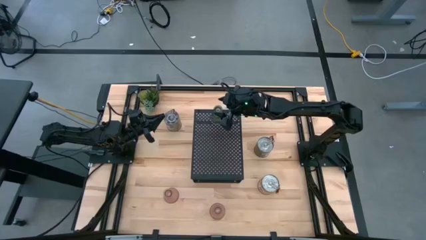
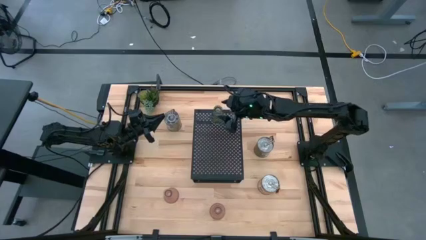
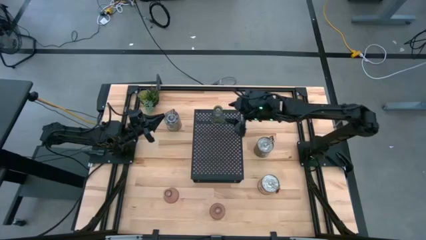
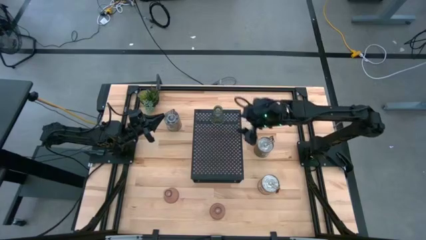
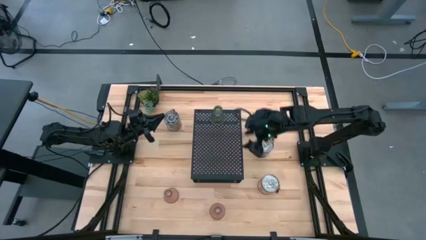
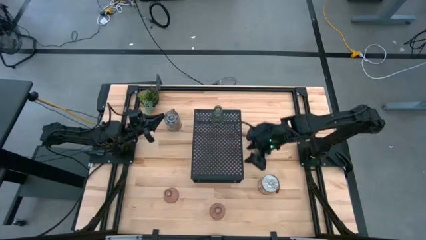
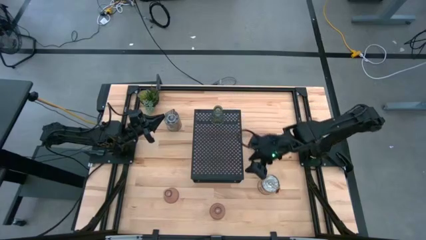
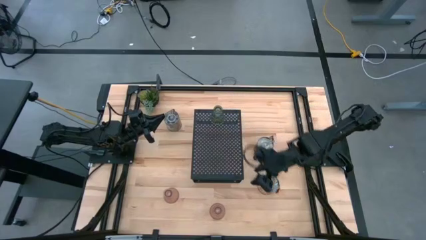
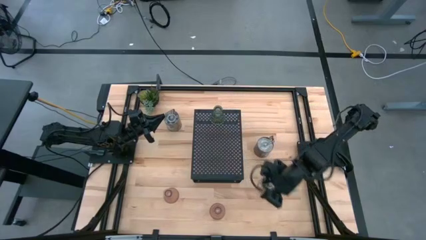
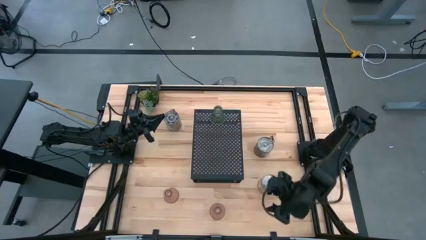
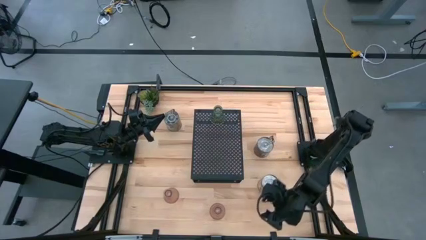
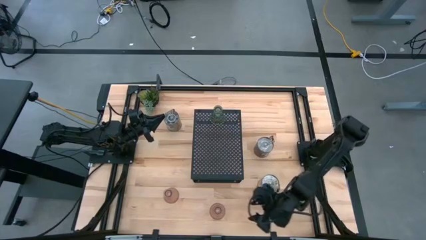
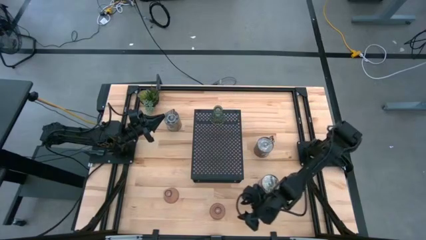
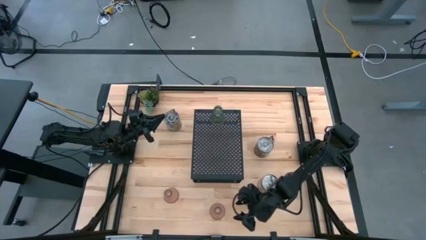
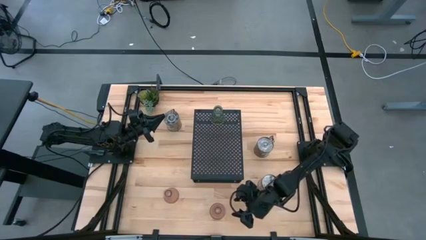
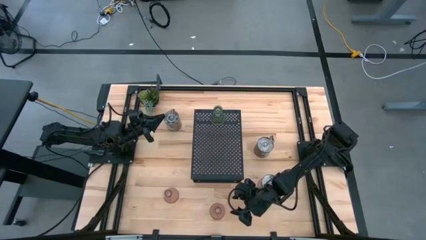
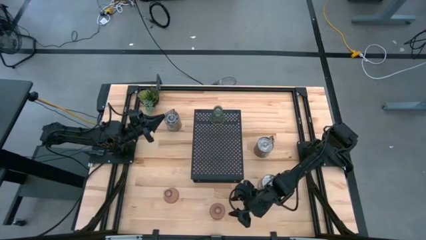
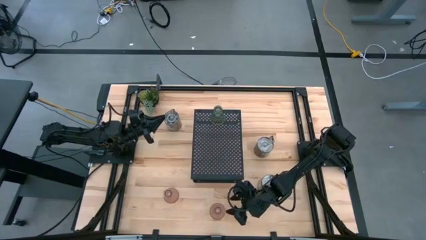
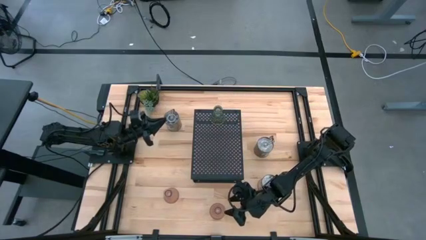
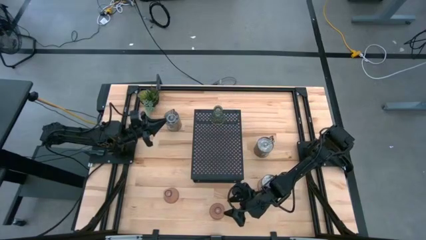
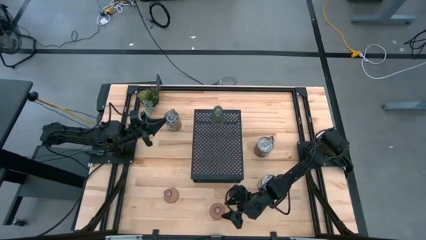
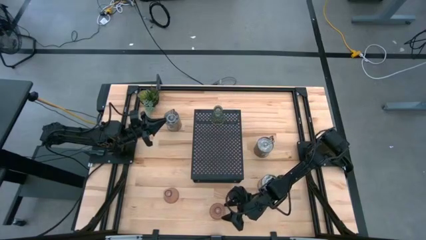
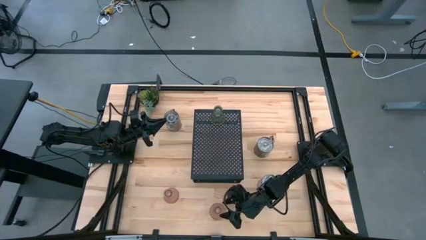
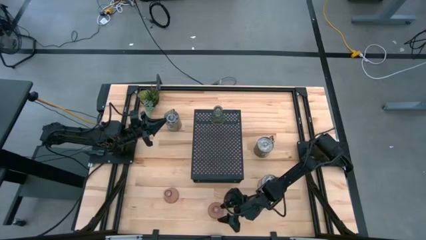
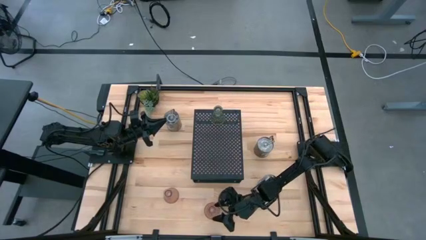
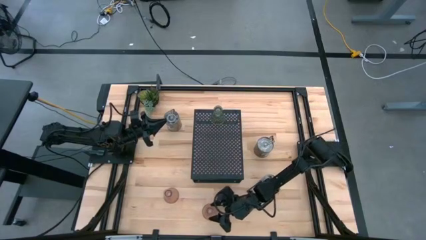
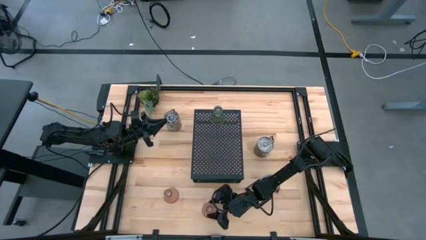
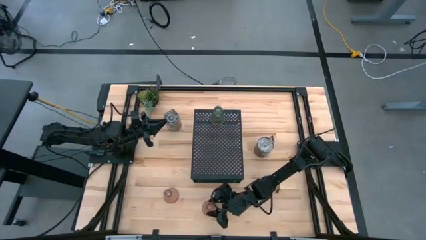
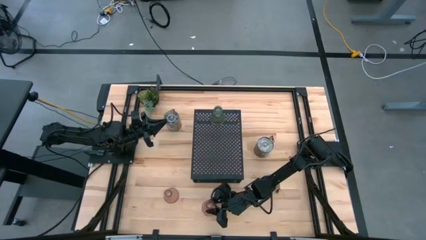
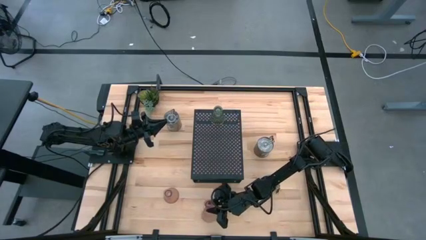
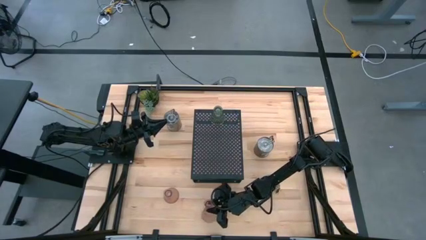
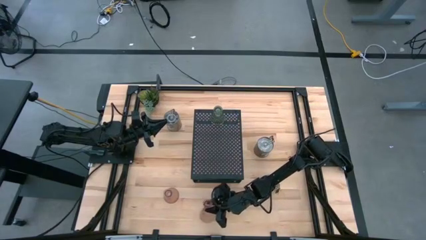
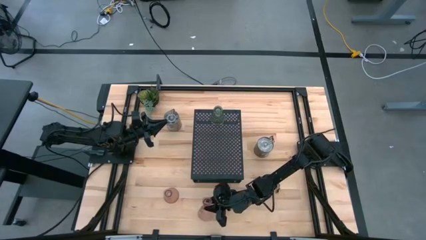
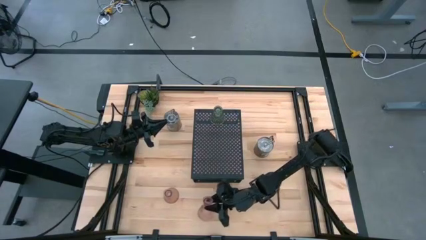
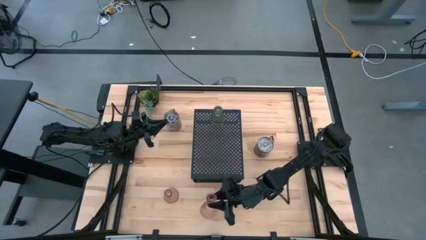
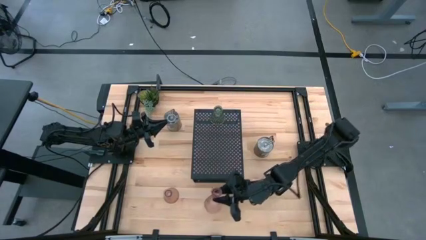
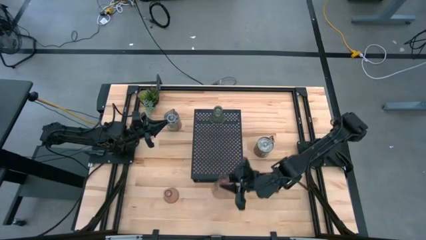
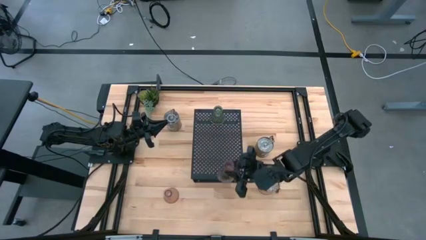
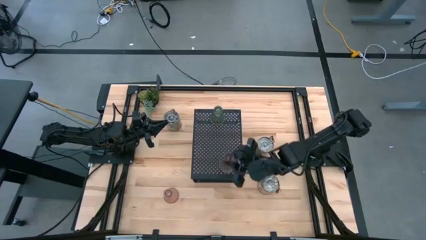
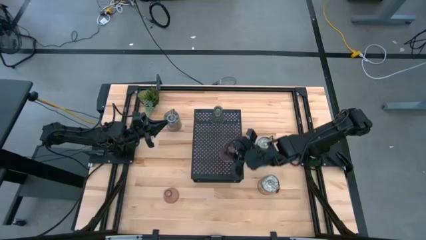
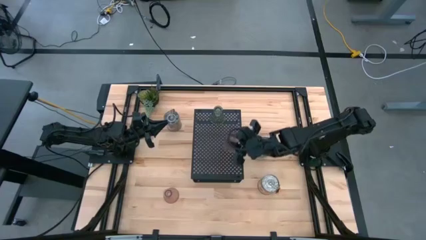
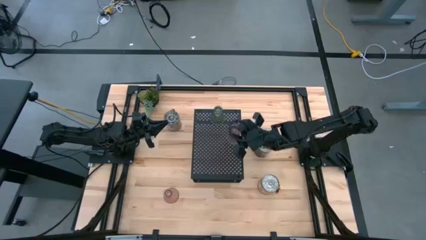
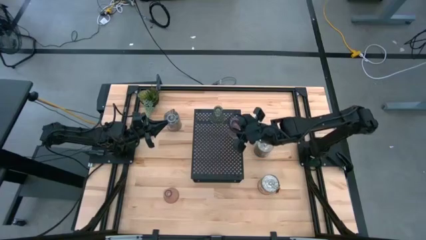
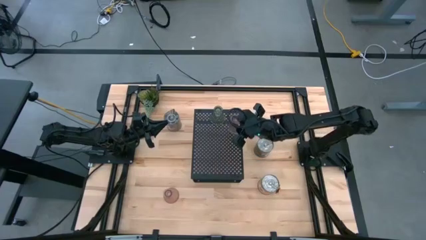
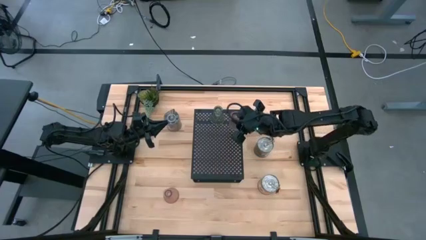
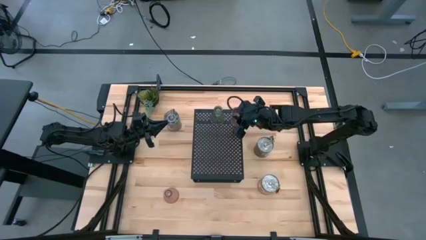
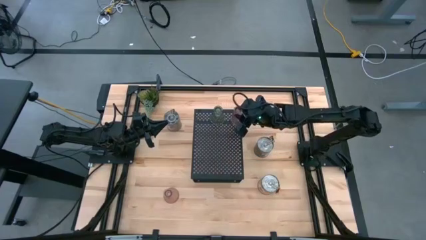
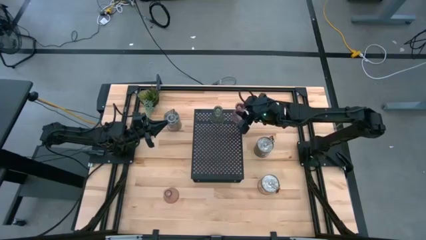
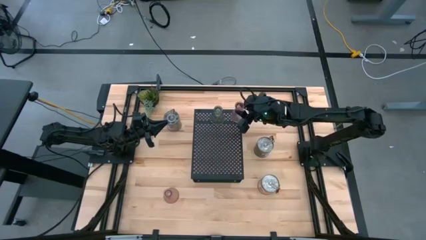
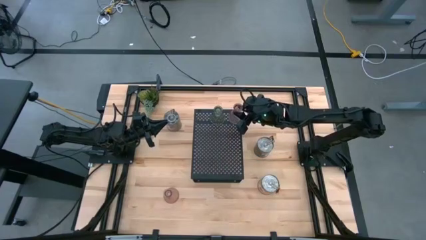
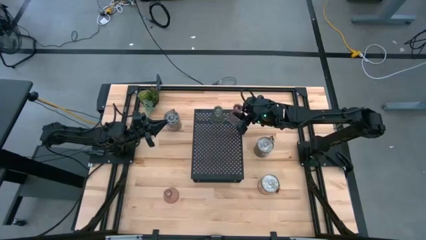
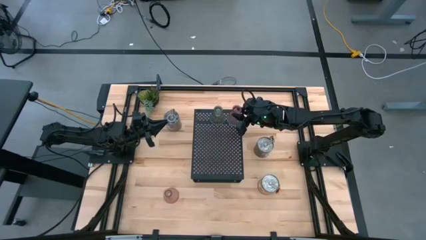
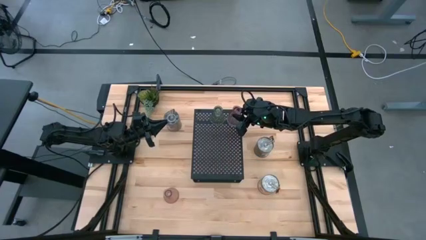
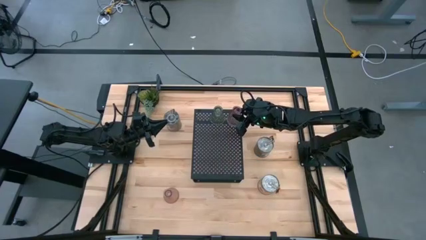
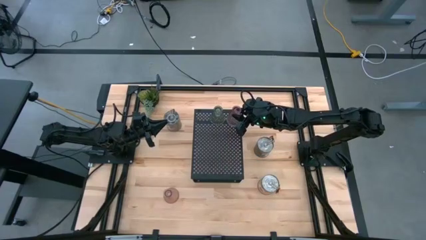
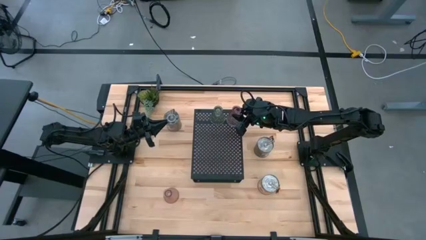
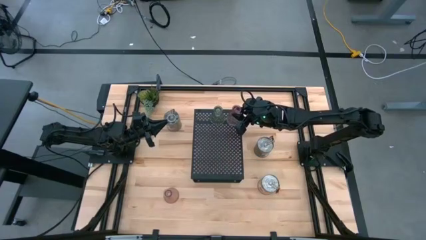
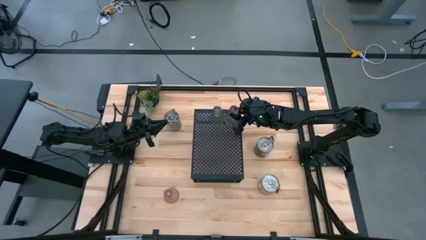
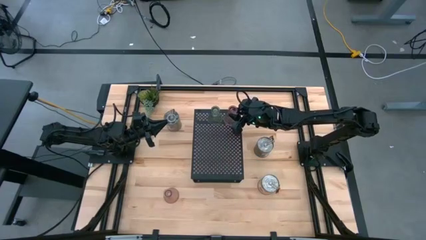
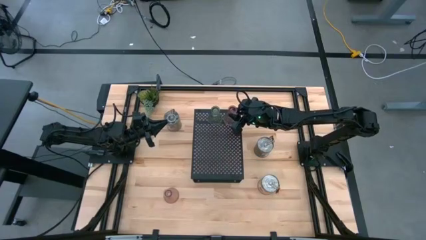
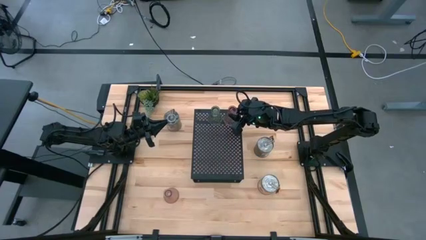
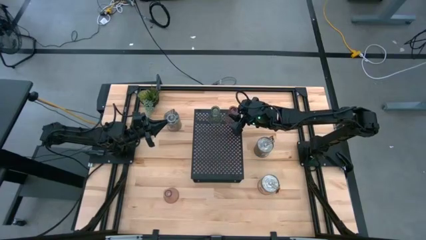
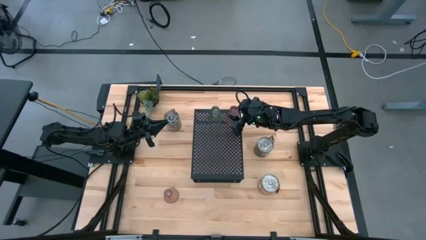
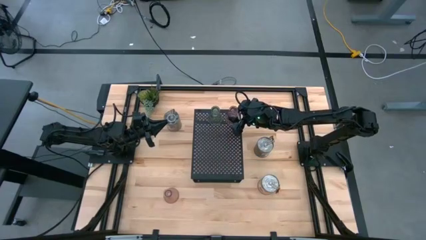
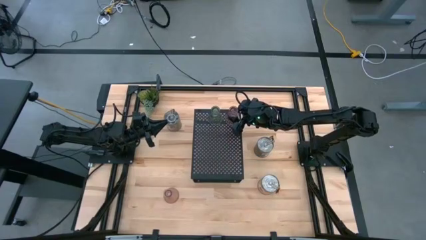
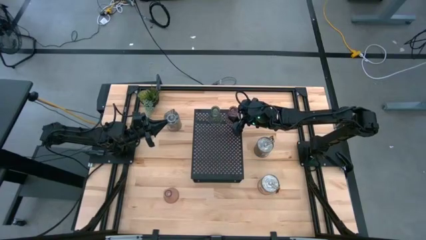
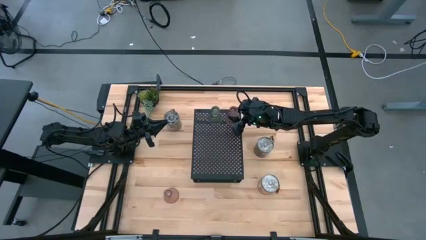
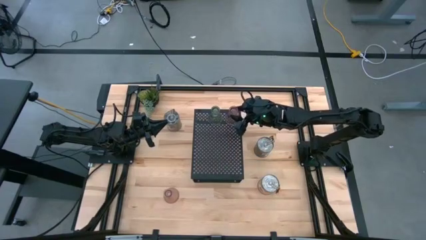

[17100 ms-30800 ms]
Task: Pick & Place candle stick holders
Put the right pink glass candle holder on the shelf

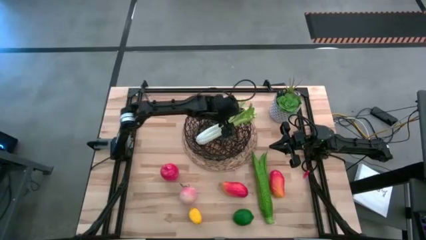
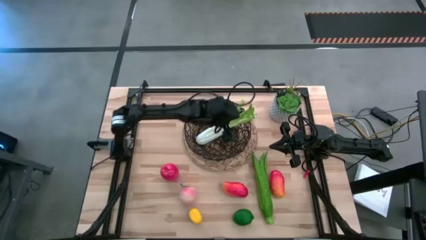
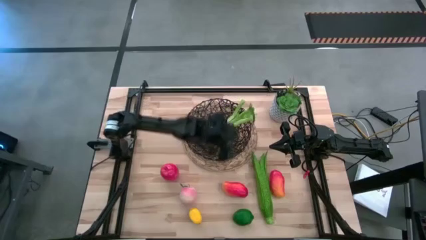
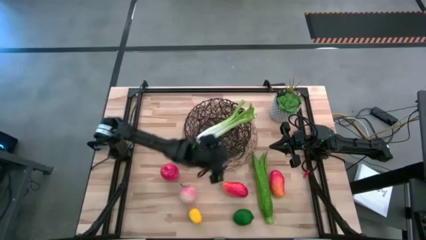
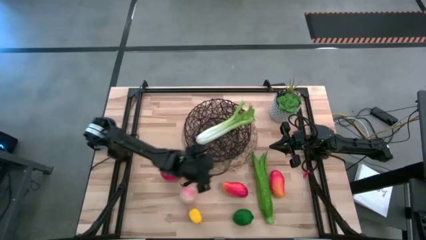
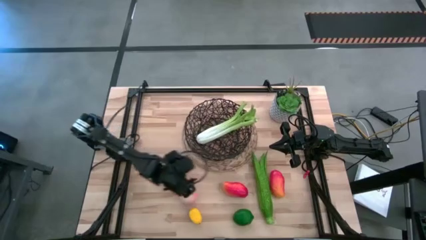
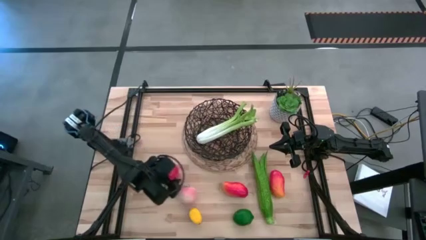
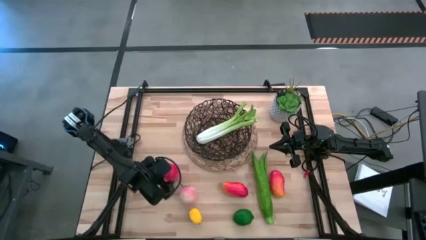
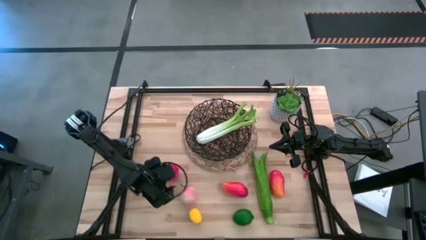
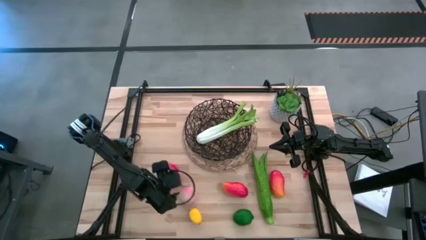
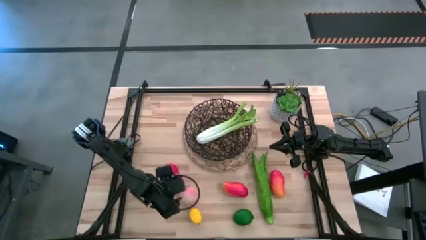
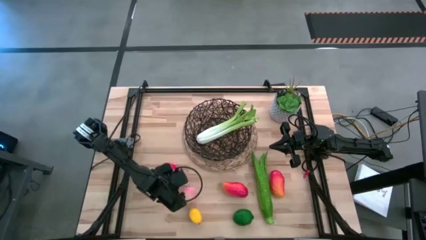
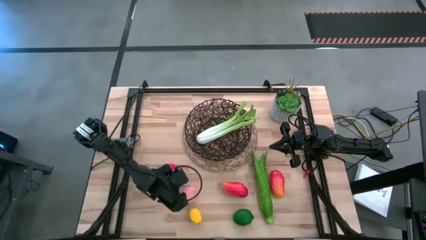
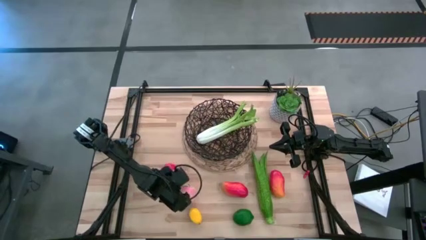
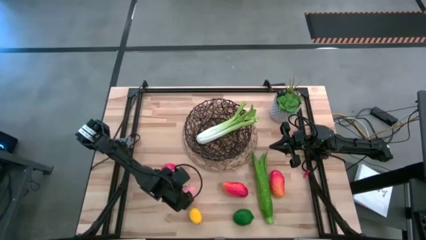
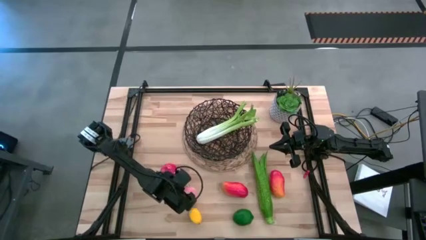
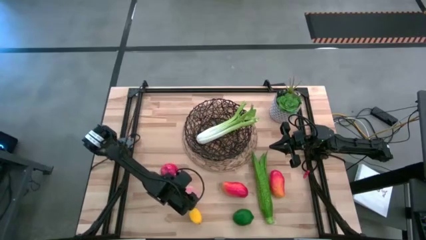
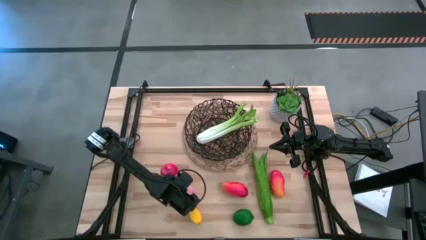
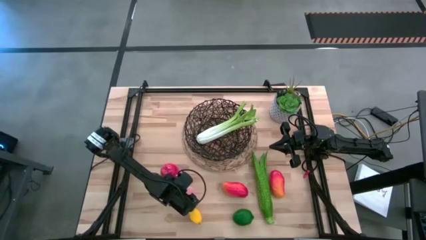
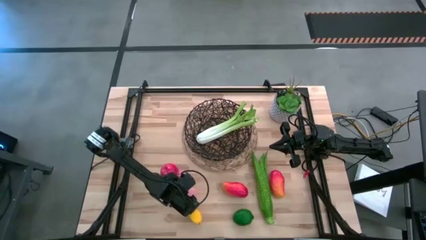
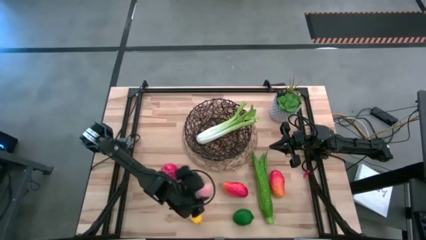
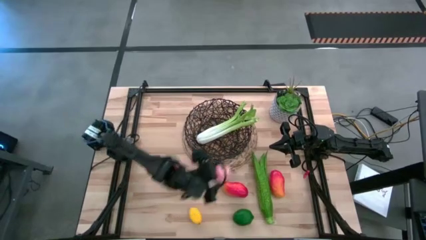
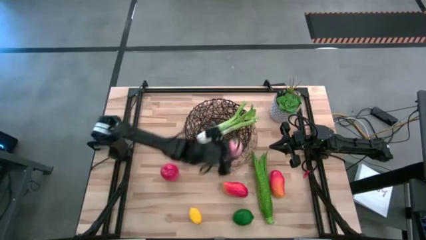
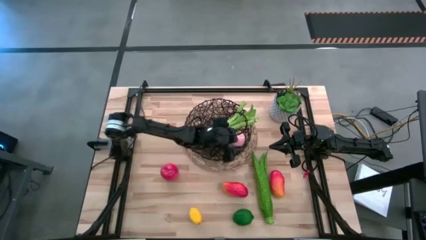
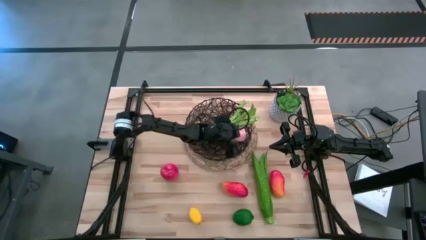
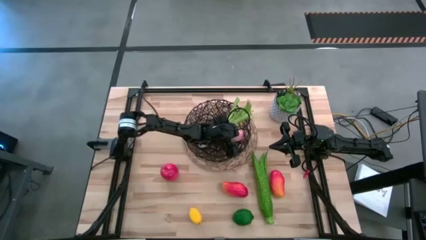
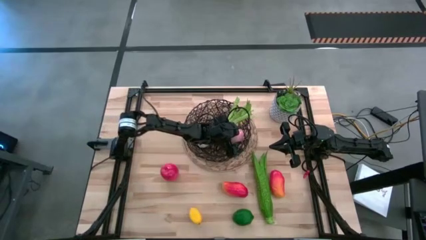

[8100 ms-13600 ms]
Task: Build produce basket
Put the pink peach into the black mesh basket
